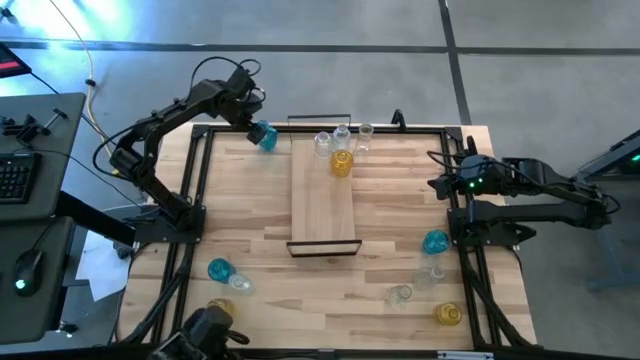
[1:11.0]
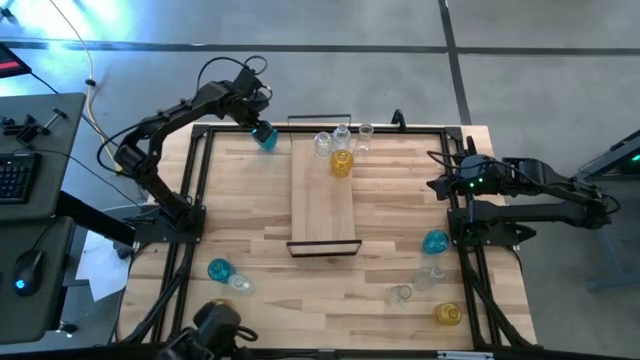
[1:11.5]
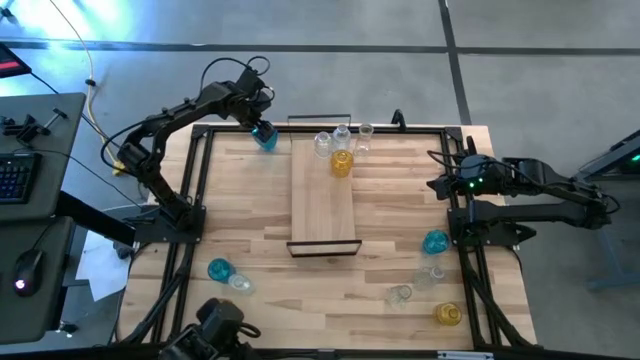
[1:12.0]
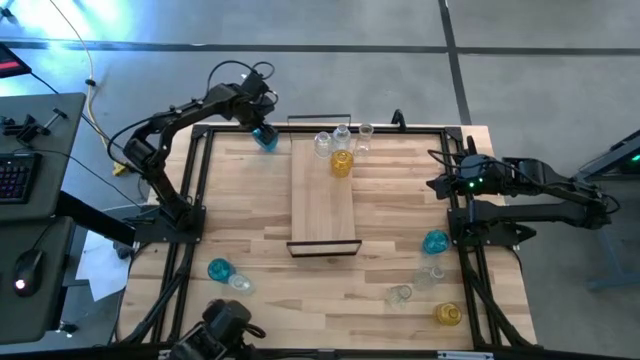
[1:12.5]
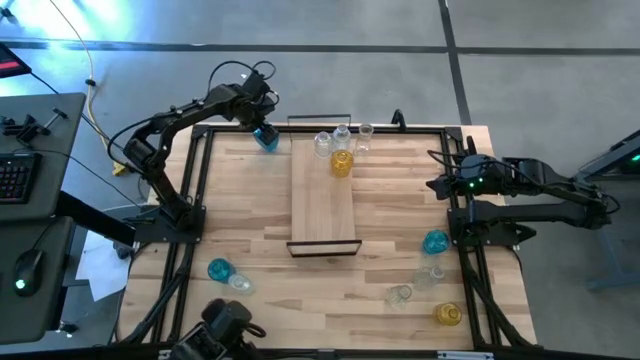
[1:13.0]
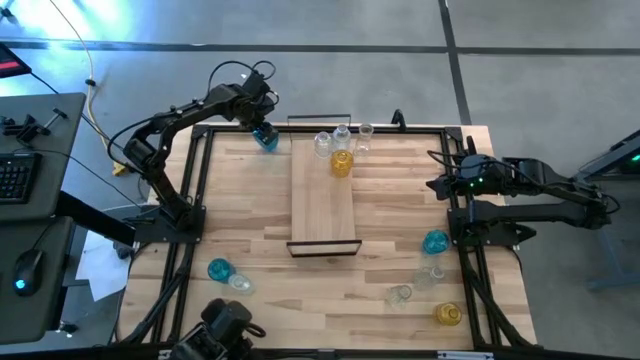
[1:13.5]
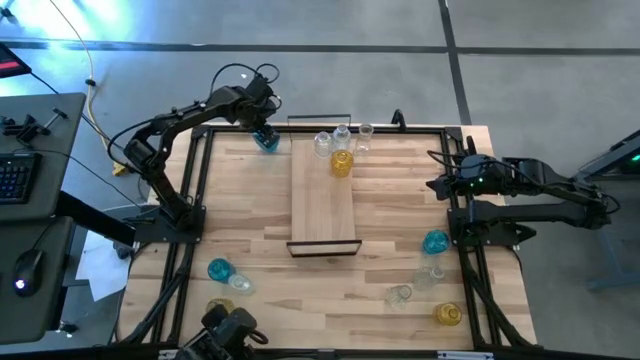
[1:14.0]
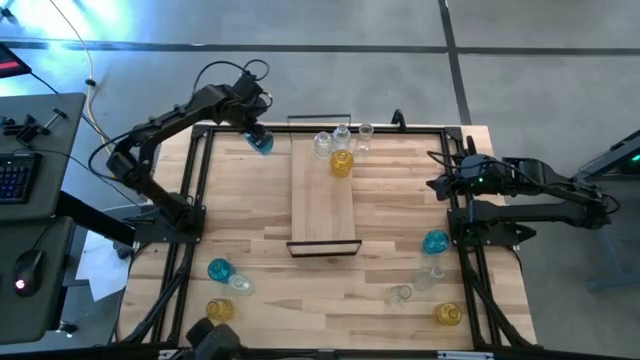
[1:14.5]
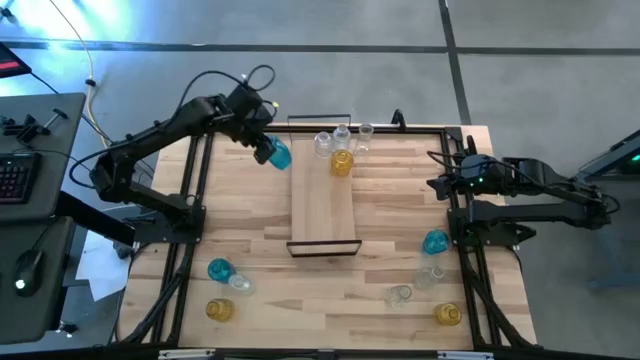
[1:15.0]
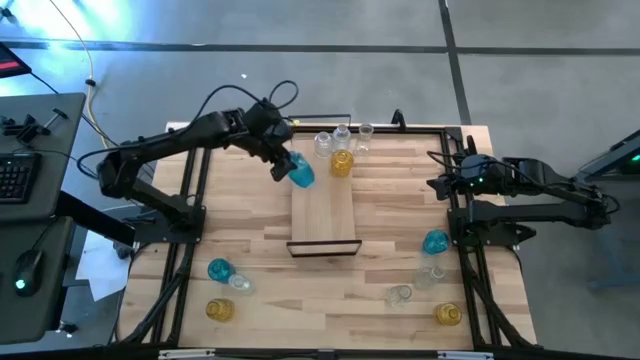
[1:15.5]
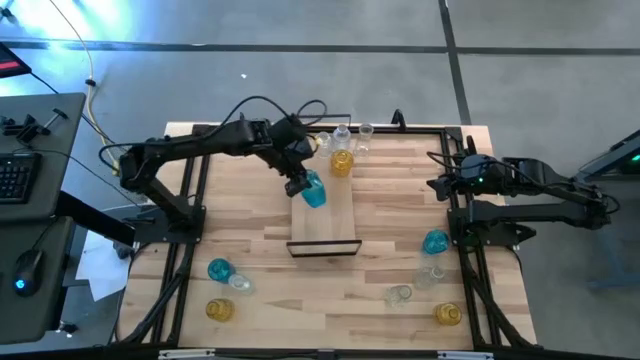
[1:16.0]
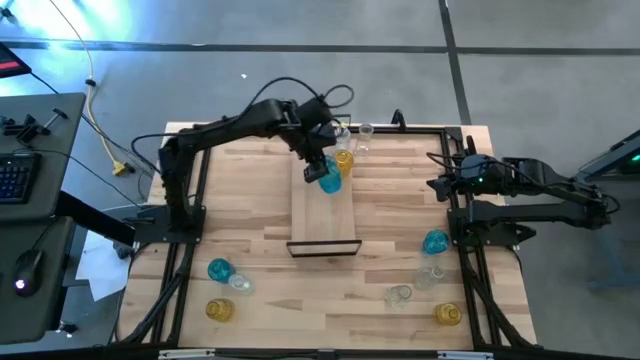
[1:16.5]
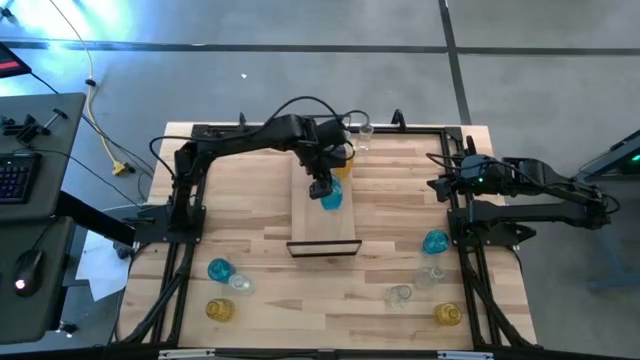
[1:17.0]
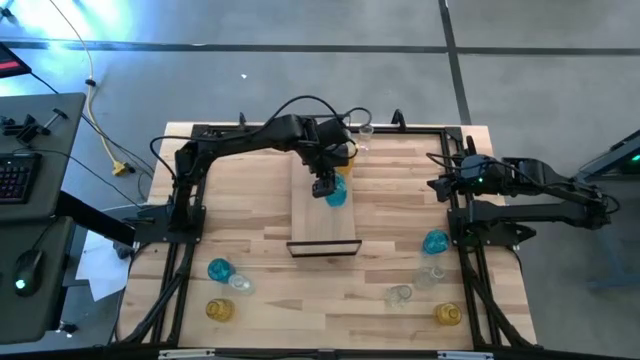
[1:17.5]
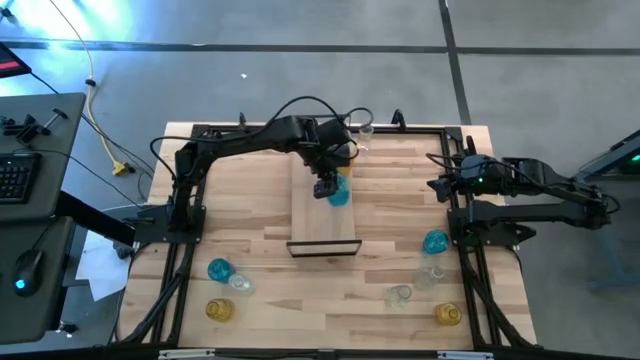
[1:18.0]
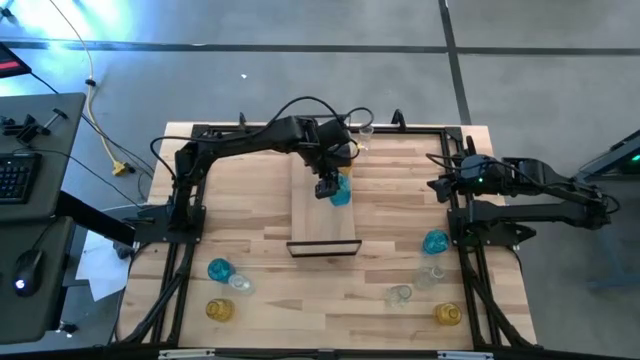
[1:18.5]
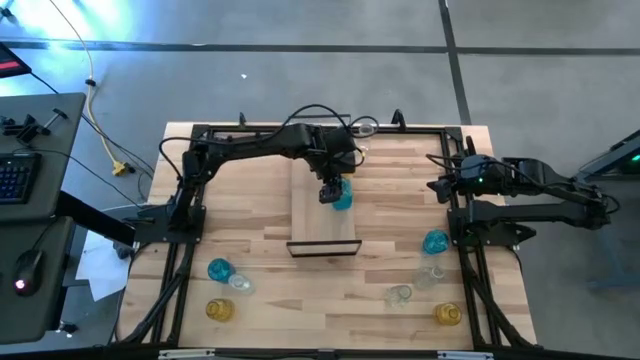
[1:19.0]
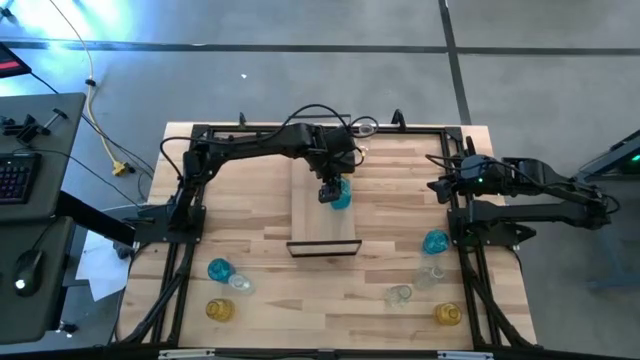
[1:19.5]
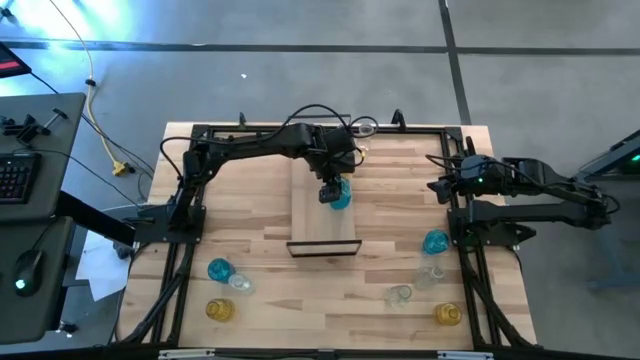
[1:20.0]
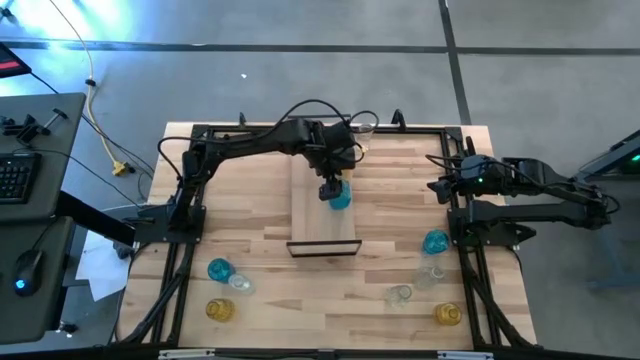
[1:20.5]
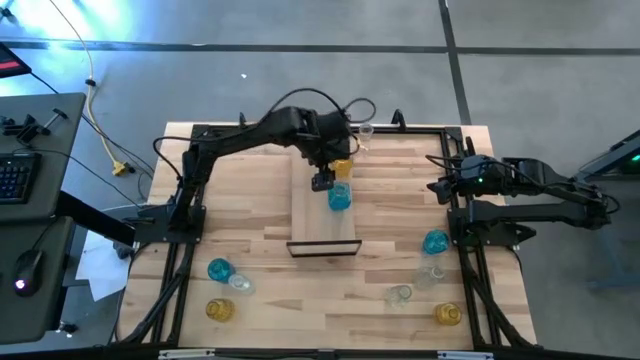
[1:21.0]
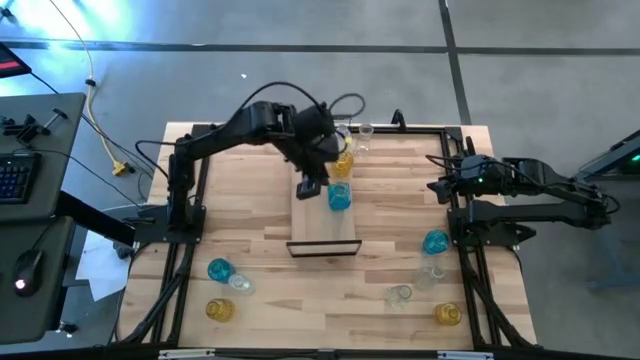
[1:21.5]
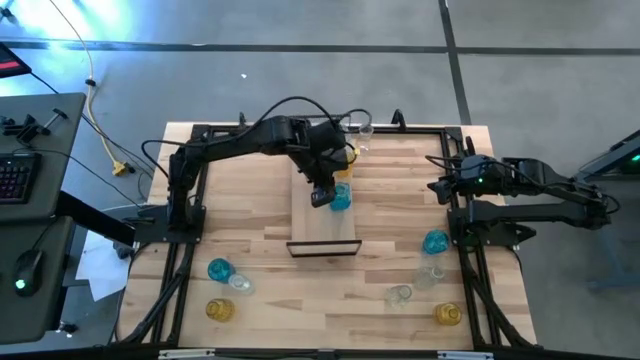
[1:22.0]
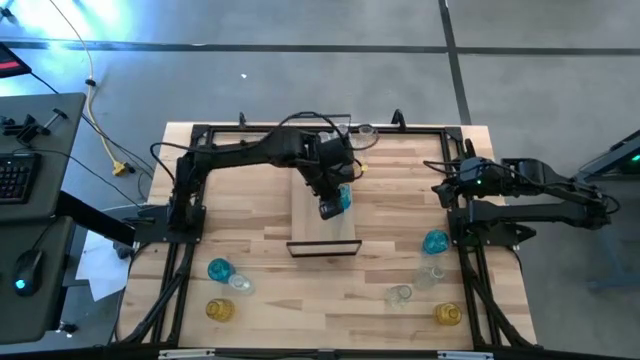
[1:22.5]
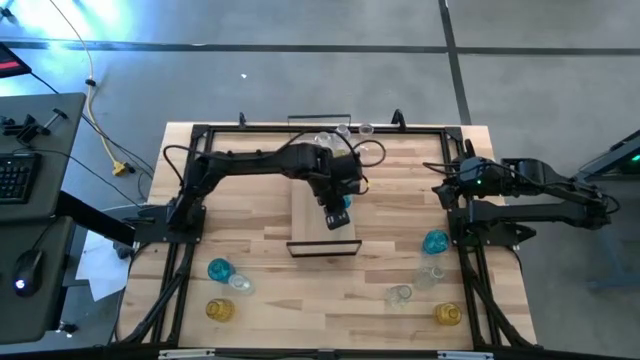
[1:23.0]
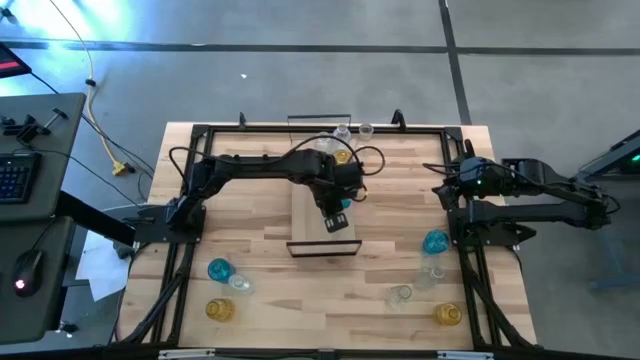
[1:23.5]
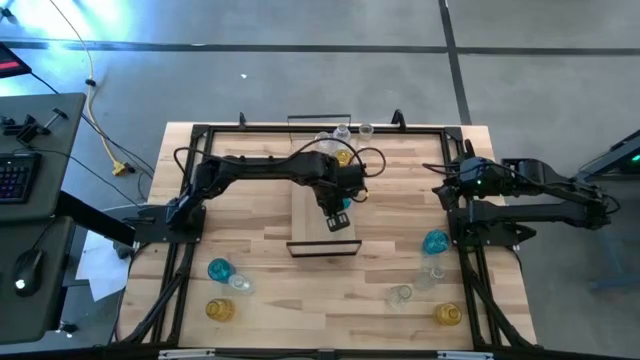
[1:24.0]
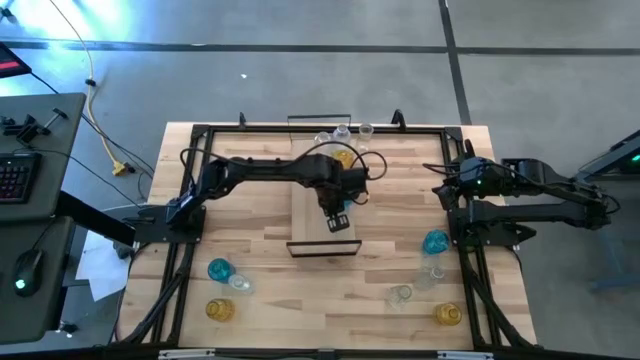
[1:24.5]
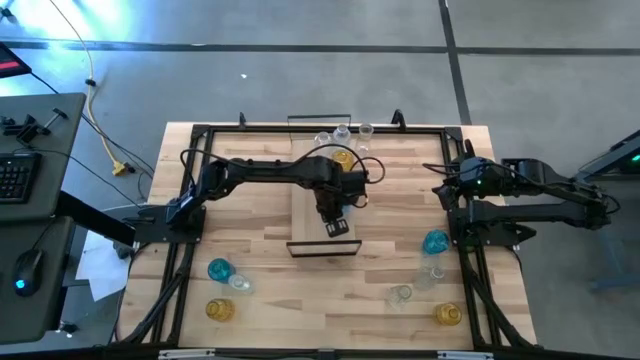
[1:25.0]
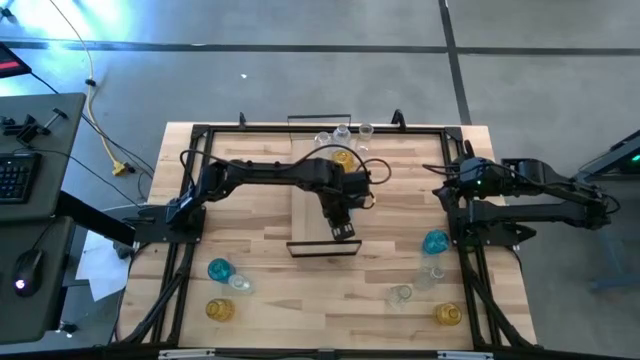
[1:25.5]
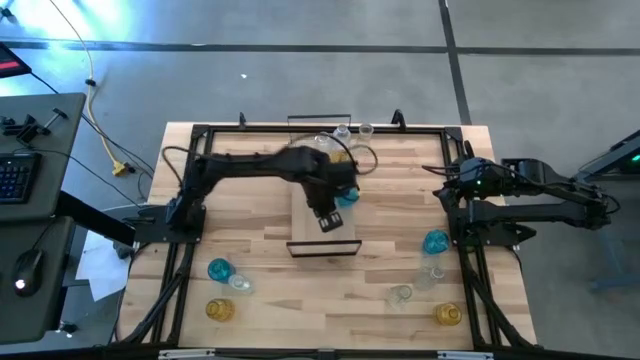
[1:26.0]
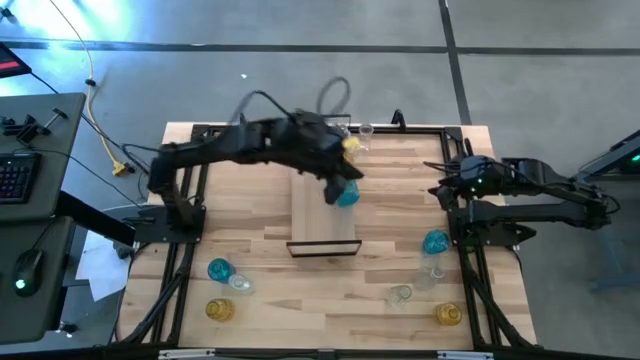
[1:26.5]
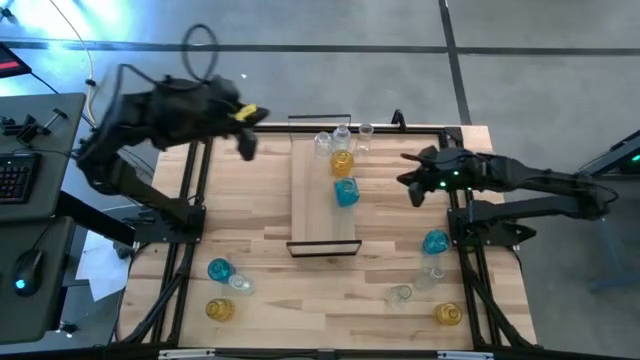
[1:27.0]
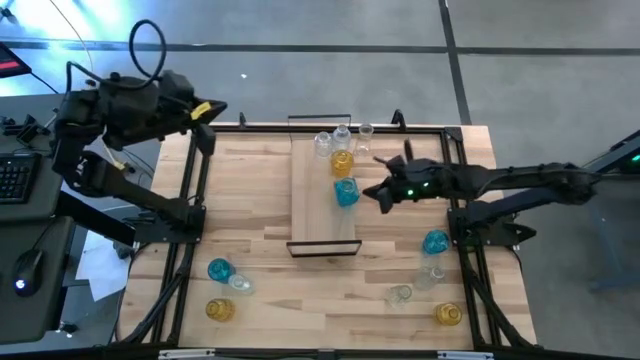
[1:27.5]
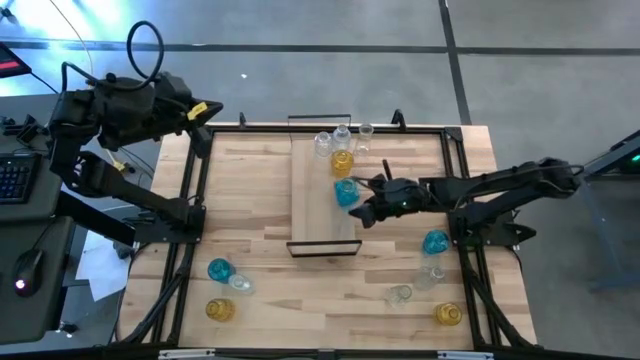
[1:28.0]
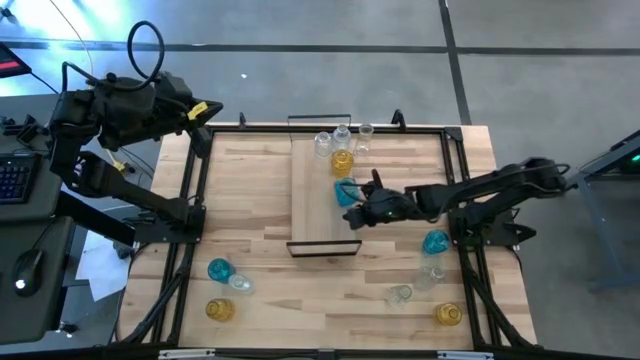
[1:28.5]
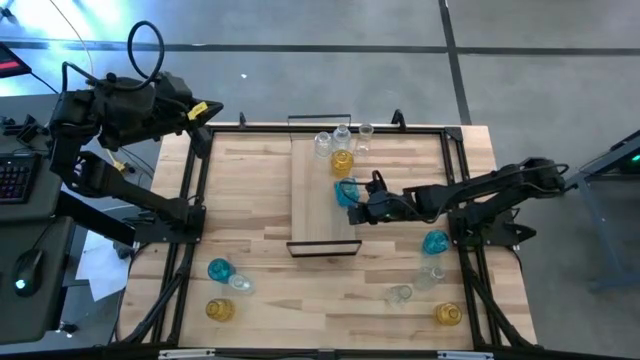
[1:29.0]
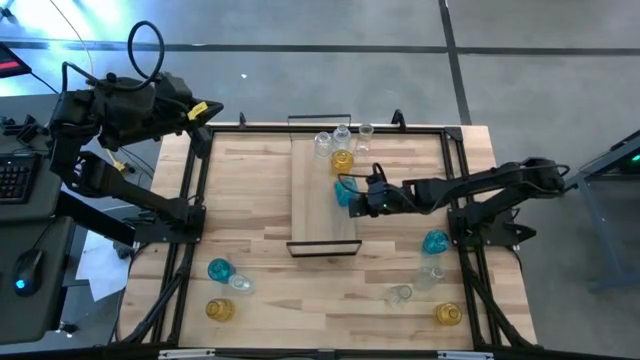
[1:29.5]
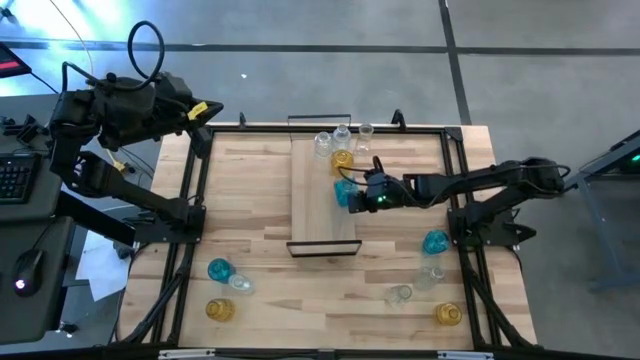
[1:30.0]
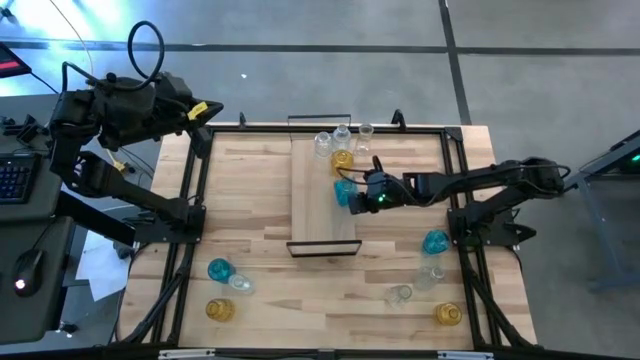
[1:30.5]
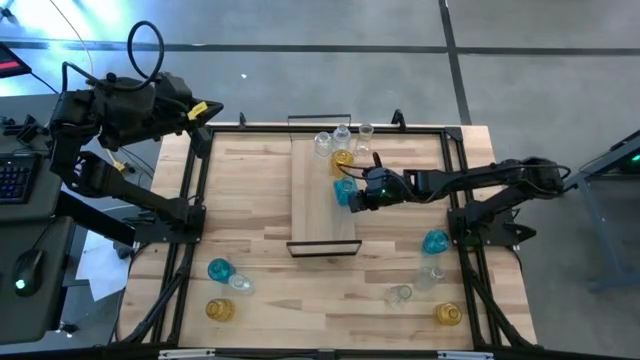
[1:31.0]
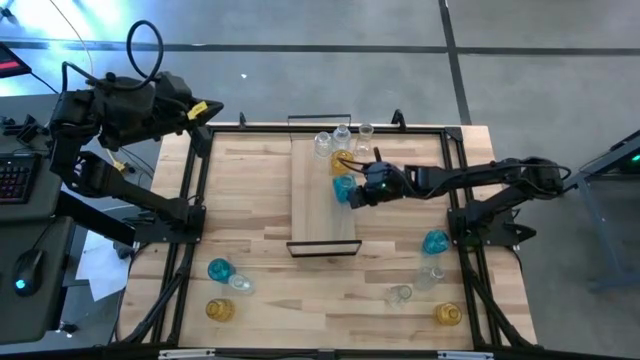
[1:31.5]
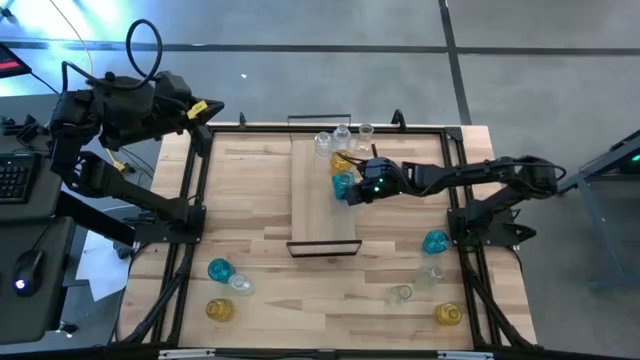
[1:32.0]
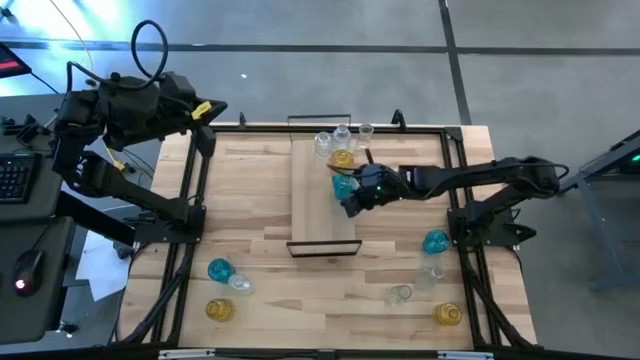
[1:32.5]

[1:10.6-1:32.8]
Task: sort vases onto shelf
Put the top blue flower vase on the shelf
